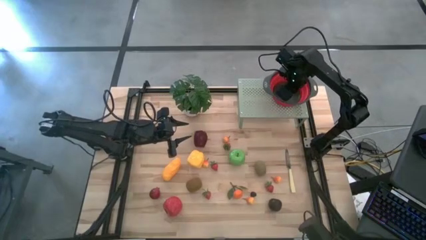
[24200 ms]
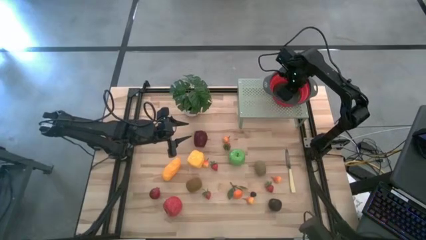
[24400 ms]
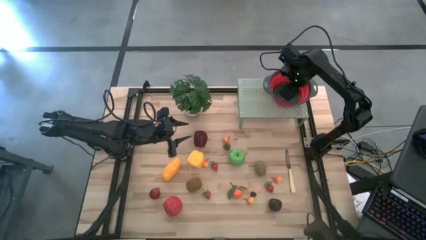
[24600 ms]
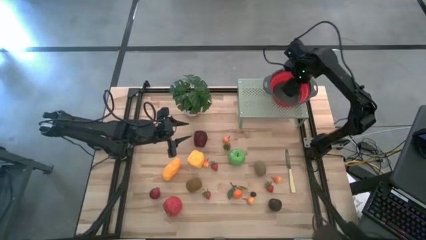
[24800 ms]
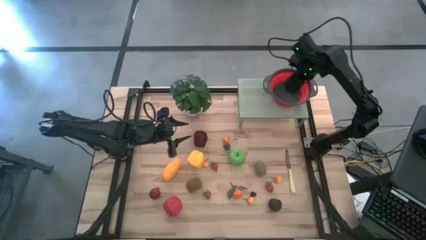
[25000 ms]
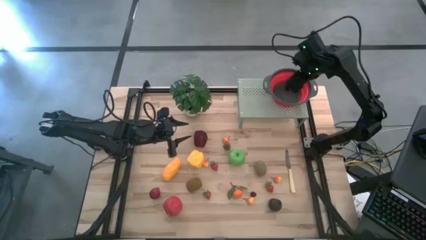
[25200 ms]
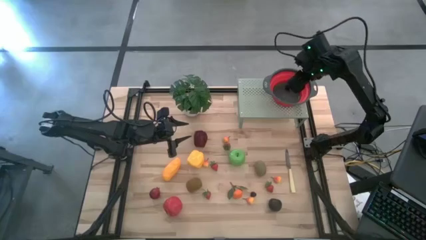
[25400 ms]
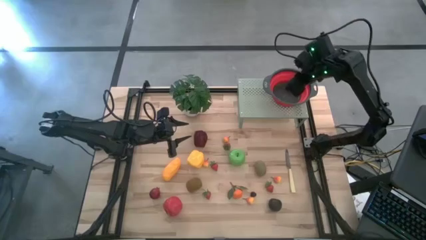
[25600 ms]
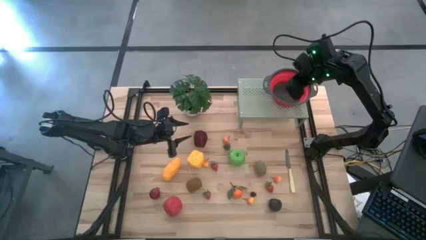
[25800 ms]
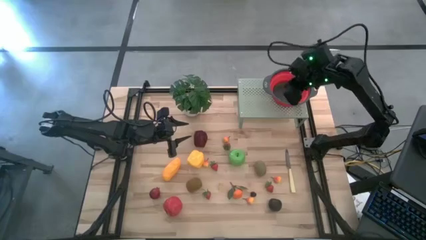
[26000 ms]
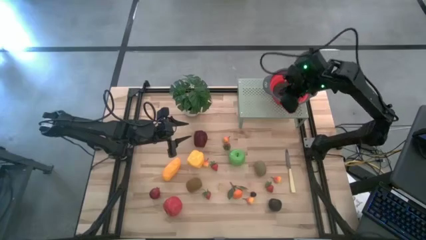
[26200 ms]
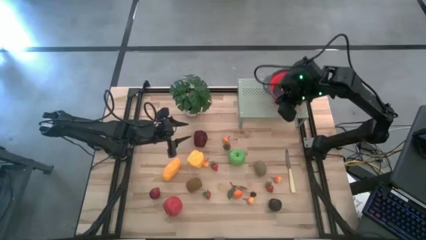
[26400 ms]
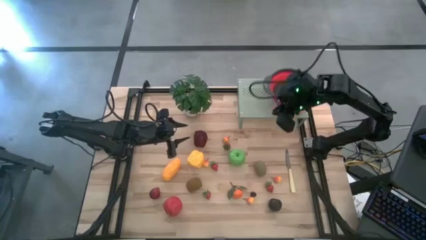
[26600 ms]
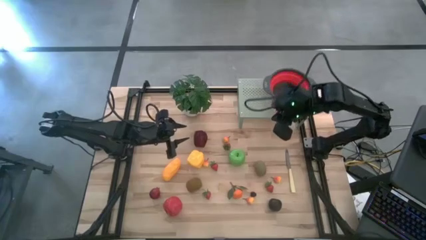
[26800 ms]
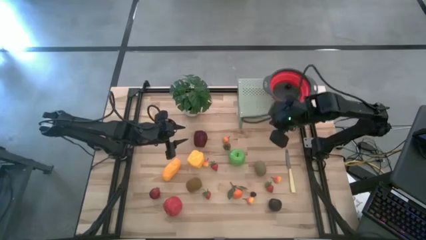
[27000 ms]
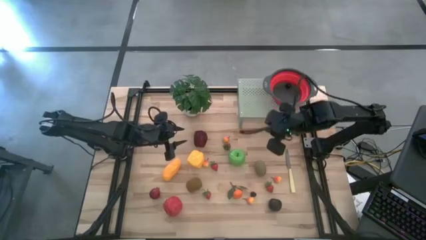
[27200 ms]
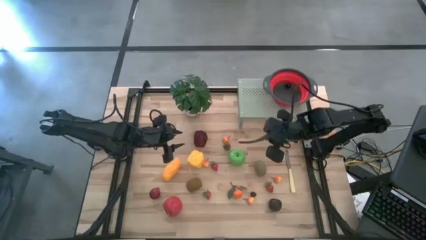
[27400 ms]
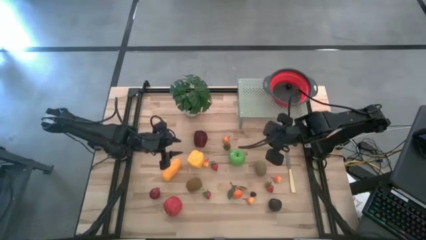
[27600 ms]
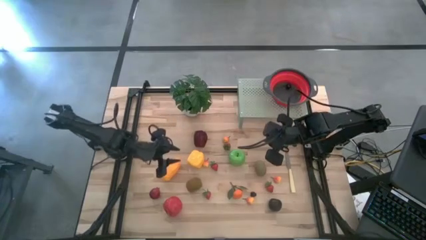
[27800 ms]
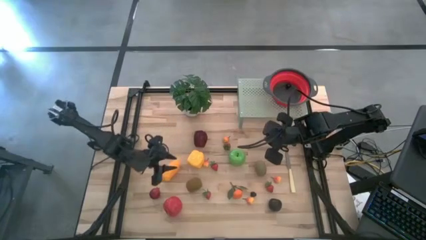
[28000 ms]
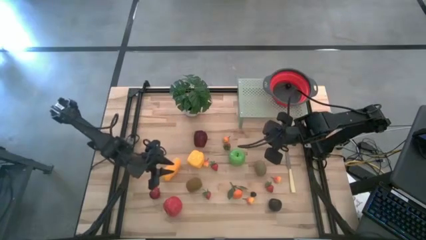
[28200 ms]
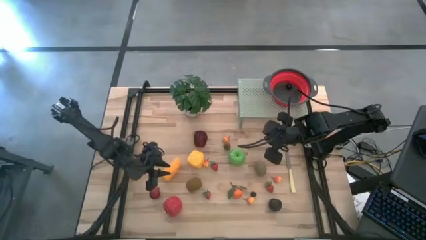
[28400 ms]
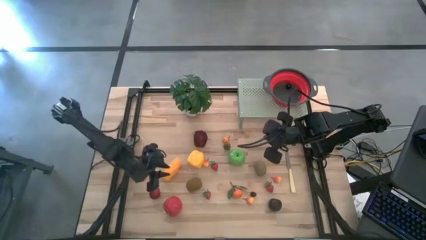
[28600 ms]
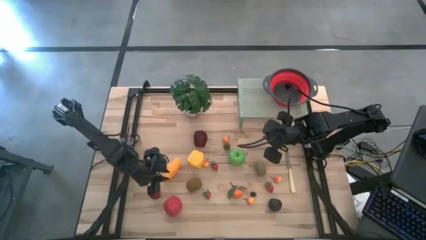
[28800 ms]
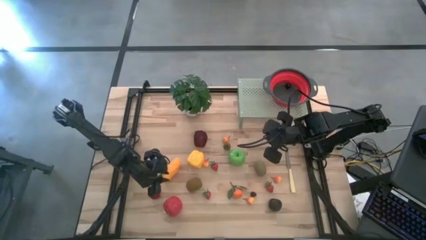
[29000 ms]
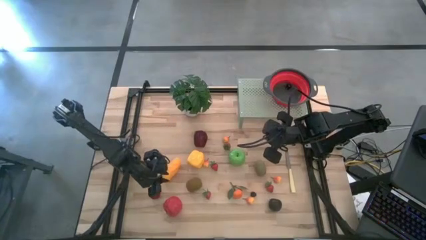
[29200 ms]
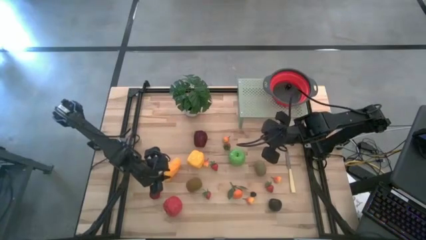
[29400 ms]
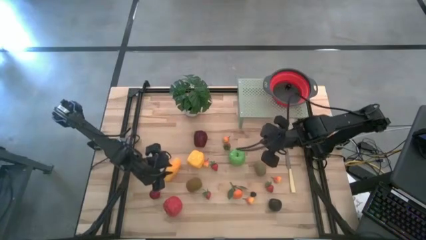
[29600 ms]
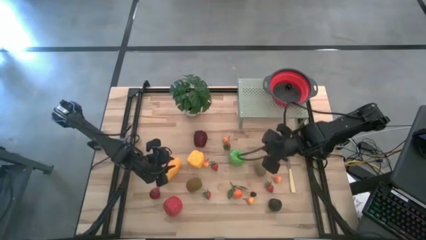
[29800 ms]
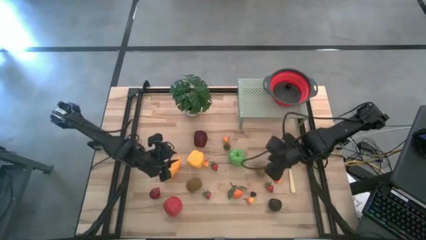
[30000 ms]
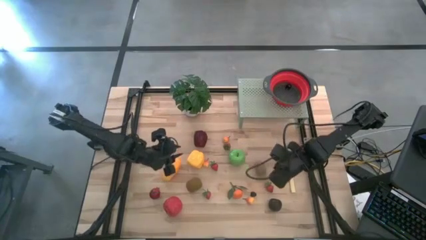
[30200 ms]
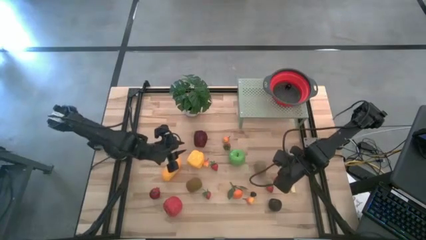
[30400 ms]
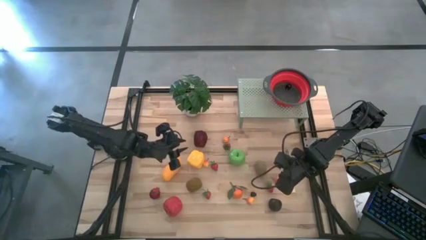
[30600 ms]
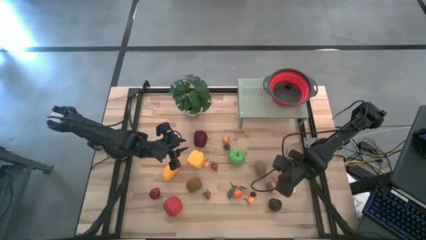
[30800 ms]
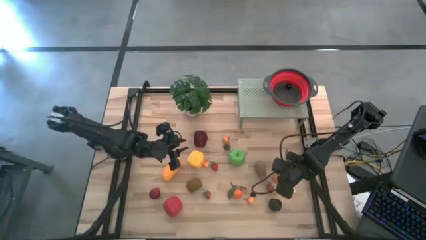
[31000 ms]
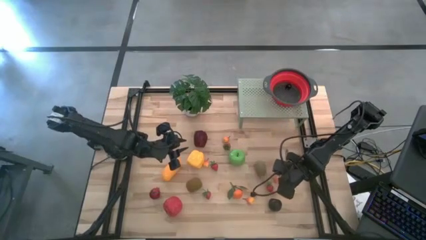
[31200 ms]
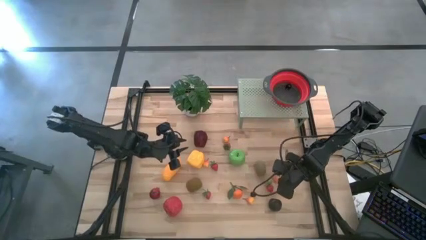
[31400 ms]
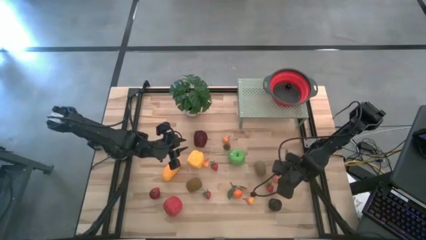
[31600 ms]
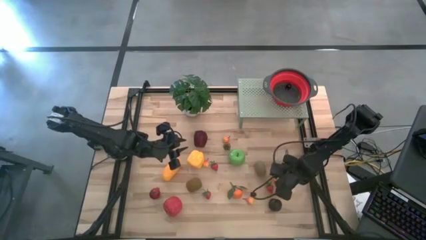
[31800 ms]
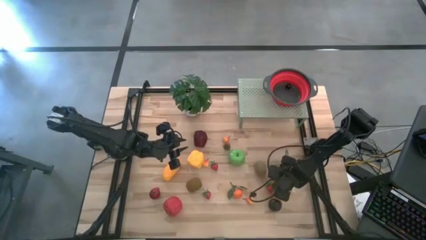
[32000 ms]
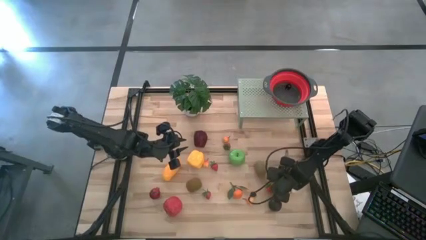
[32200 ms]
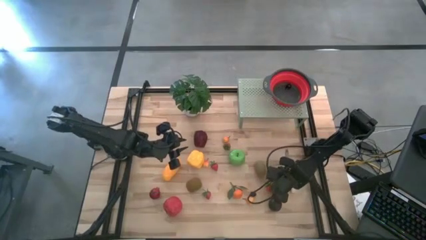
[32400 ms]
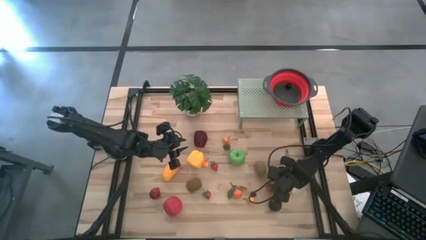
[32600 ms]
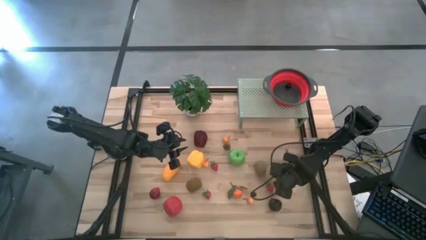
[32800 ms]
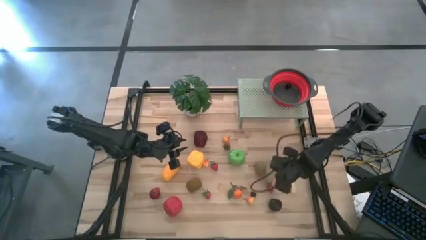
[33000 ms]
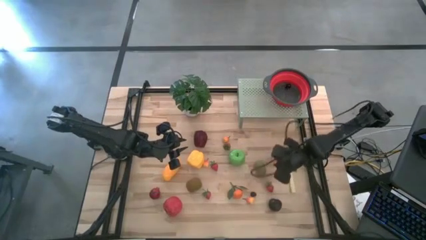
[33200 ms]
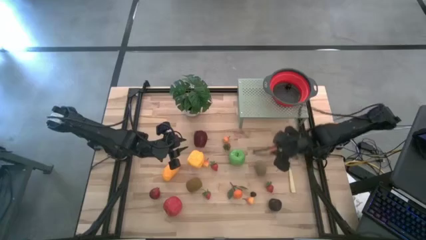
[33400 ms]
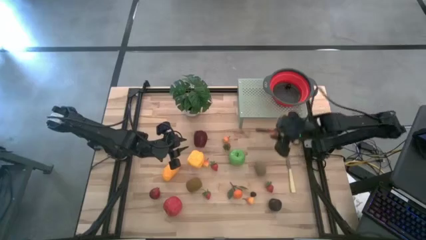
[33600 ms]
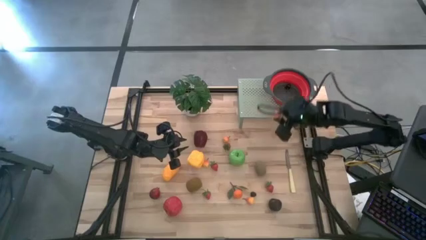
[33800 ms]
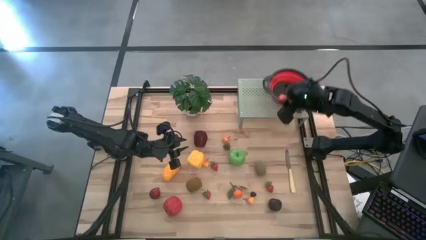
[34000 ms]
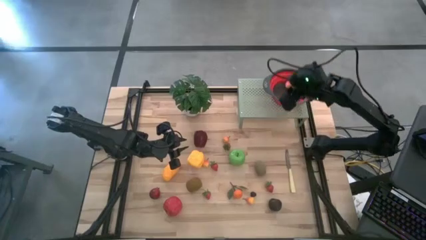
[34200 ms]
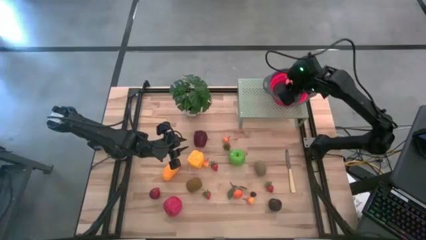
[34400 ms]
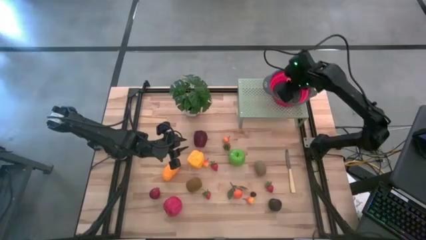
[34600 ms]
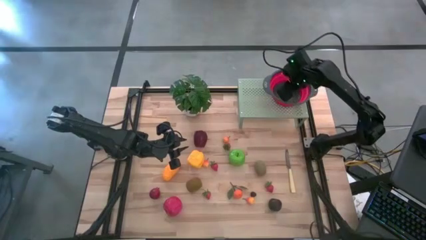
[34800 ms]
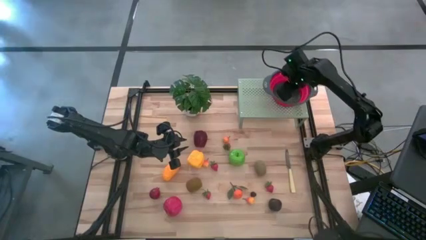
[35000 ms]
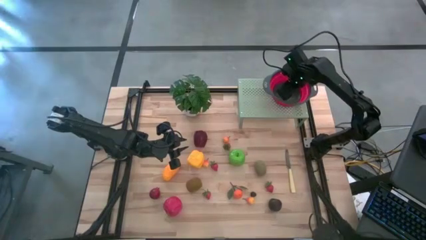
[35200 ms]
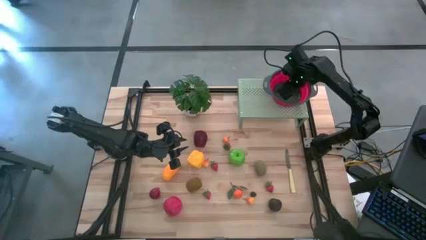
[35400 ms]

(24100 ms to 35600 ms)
Task: Pick & Place Fruit
Put the orange pear into the red strainer bowl on the shelf

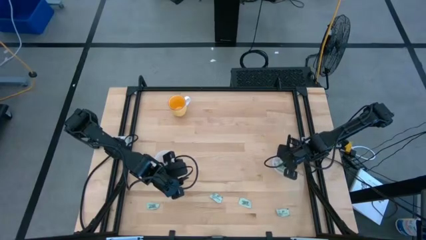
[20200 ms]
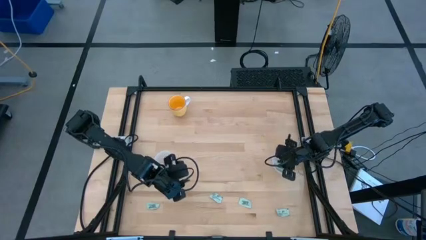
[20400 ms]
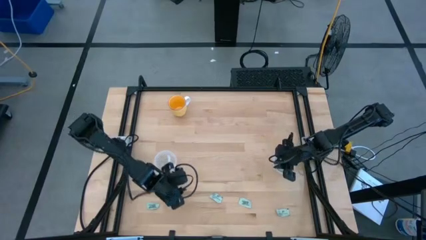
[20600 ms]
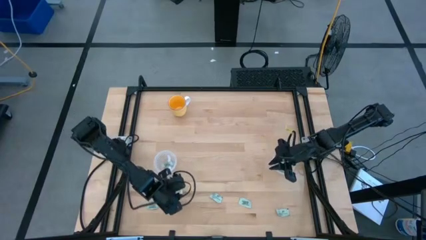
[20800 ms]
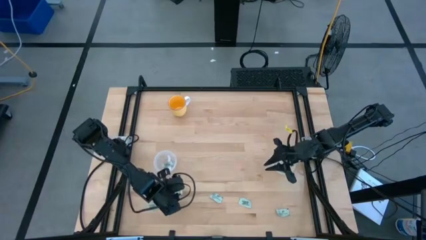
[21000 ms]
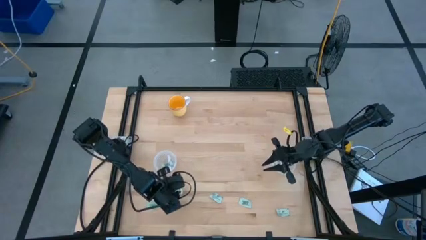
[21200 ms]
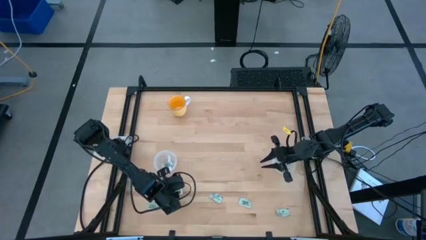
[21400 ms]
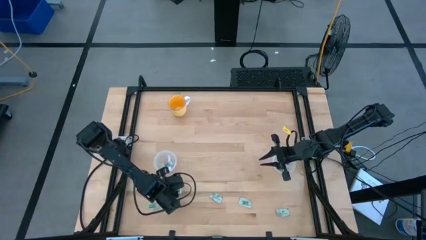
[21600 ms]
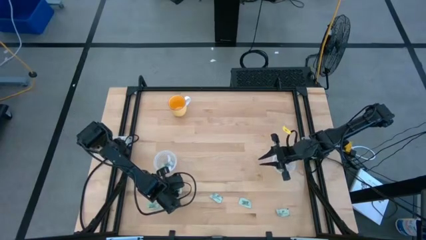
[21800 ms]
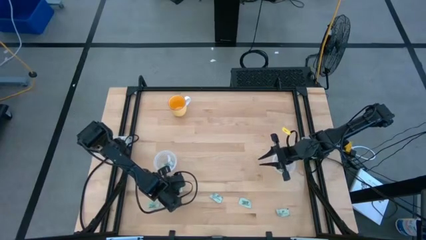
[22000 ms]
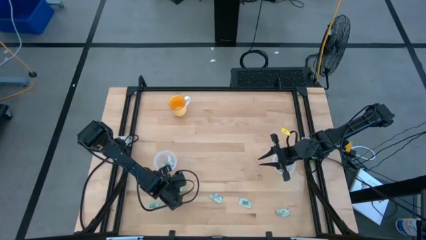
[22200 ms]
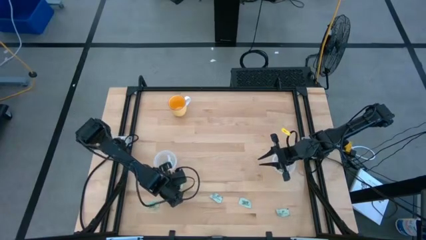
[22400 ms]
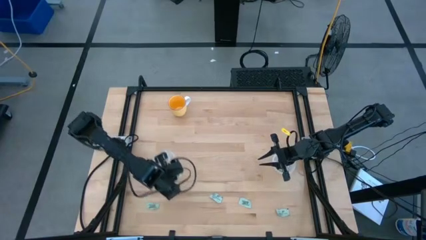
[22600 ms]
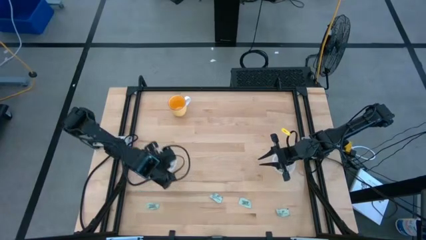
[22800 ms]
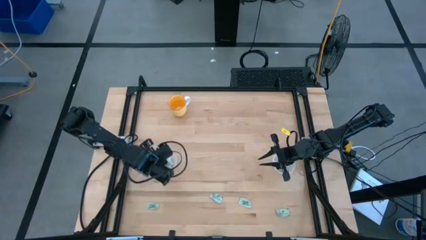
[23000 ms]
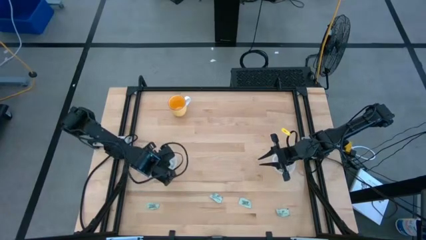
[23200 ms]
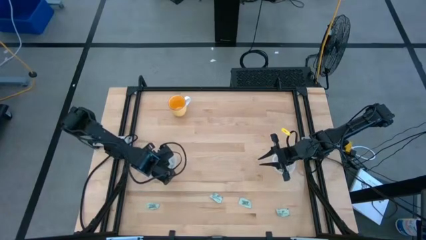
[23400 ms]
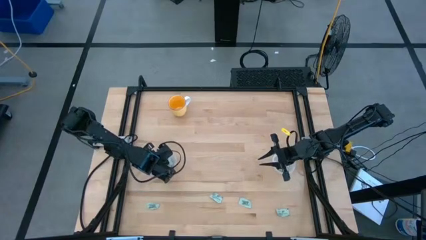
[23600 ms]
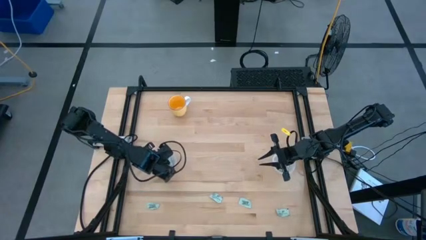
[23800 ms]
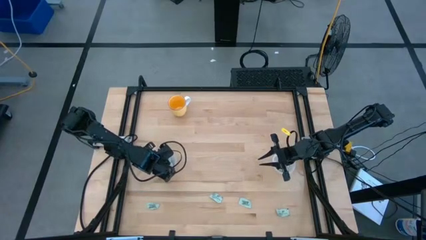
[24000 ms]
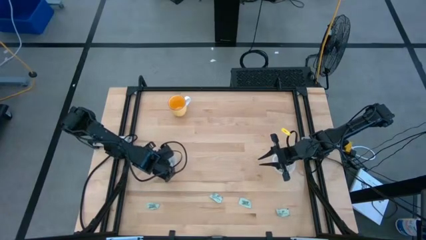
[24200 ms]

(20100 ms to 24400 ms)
Task: Pick and place items into bin
Put the stevia packet into the left transparent bin

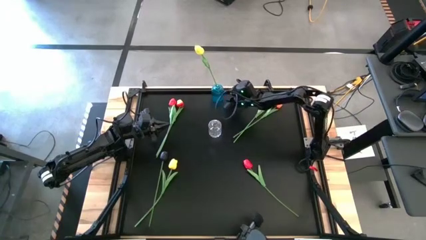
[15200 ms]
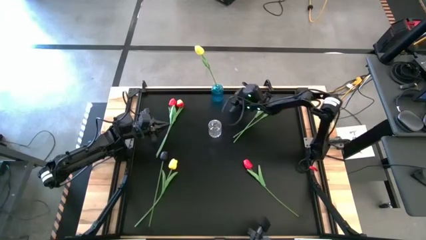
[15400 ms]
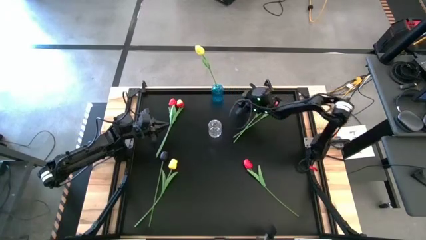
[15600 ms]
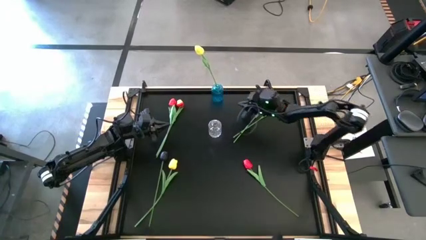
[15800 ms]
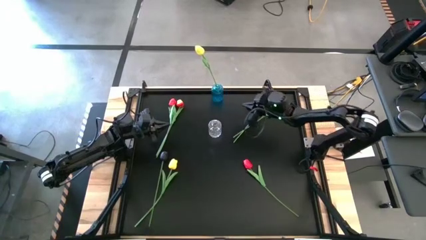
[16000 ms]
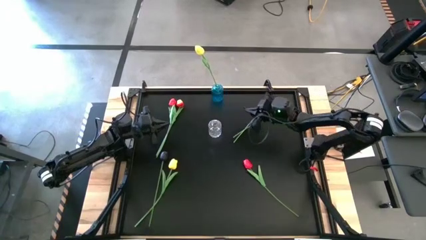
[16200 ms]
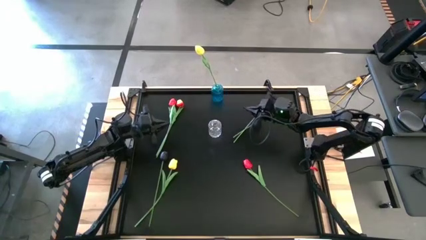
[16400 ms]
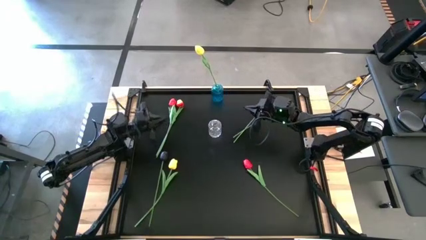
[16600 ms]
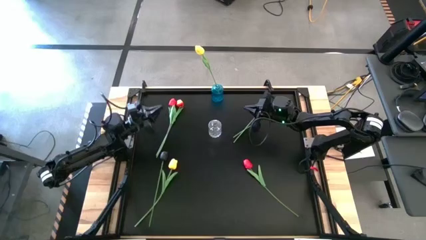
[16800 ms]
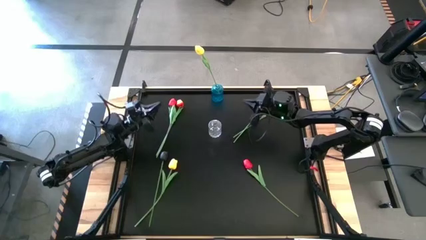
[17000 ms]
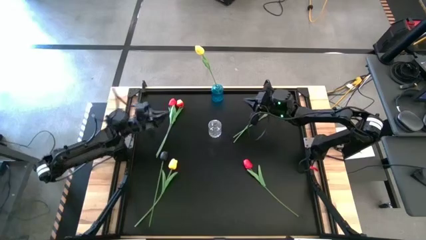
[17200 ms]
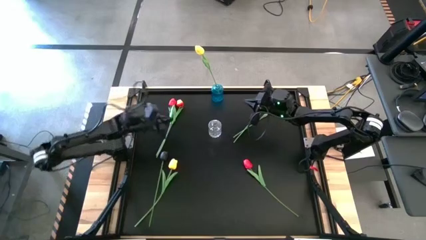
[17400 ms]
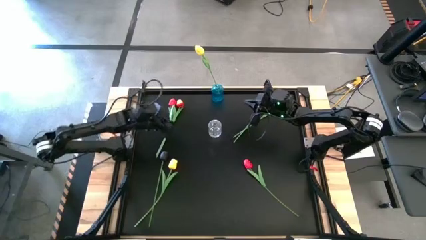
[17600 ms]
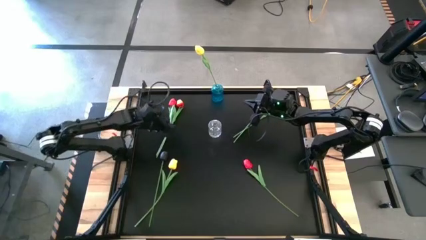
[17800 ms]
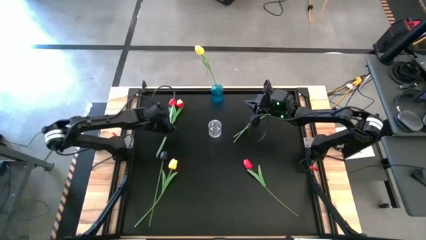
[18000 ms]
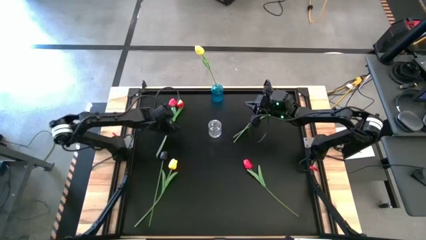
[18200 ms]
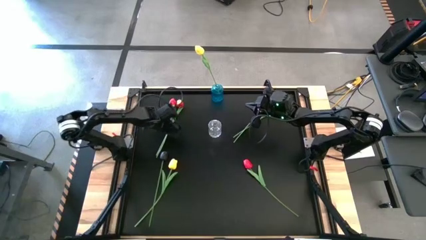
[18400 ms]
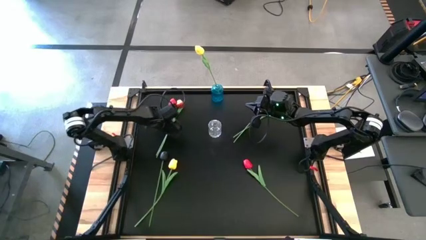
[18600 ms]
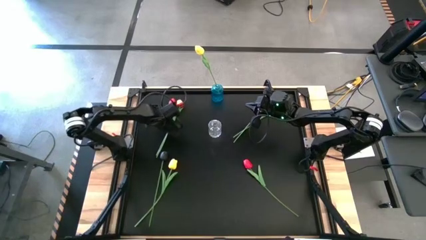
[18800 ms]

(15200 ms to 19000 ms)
Task: Sort flowers into vase by color
Adjust the top red tulip
